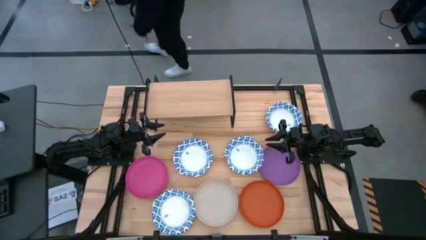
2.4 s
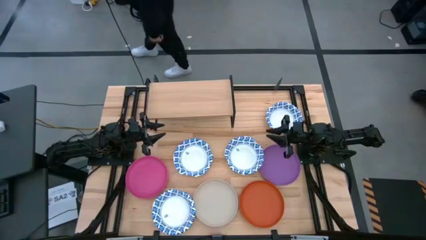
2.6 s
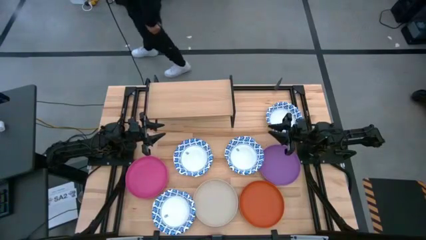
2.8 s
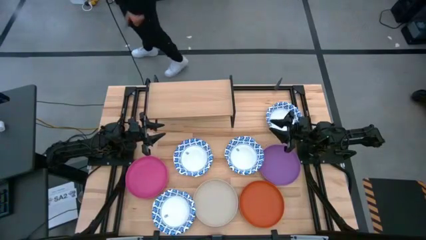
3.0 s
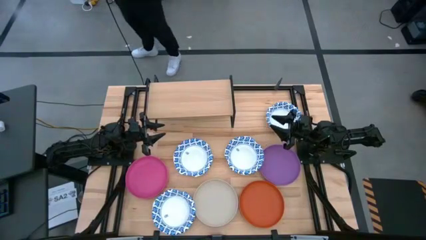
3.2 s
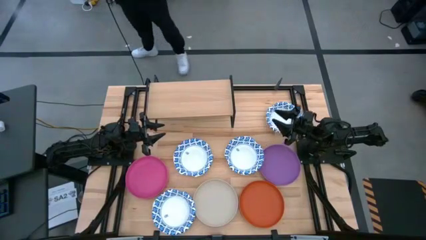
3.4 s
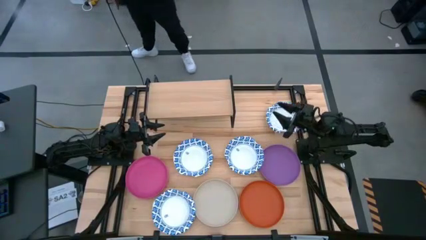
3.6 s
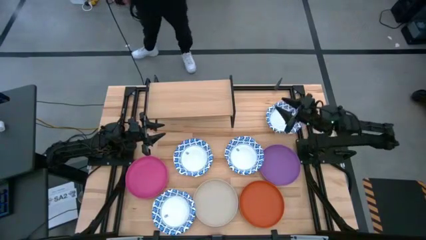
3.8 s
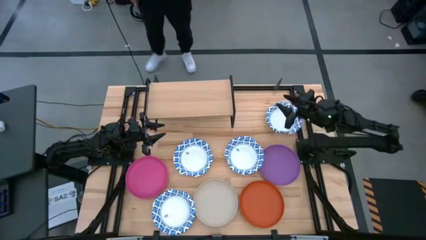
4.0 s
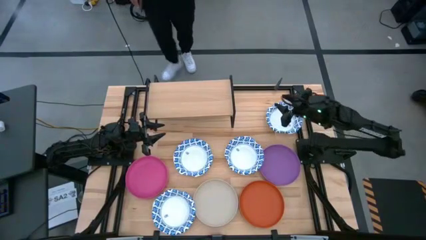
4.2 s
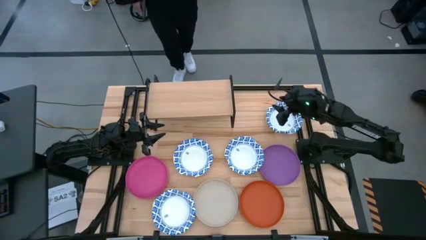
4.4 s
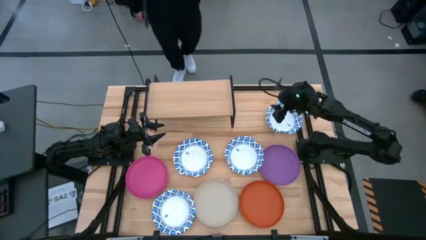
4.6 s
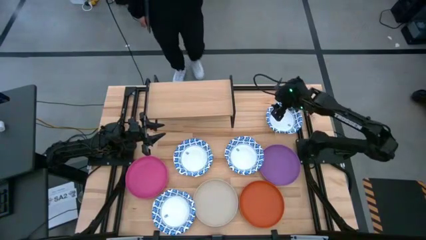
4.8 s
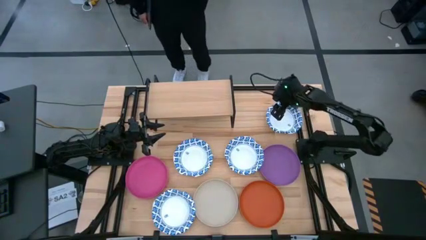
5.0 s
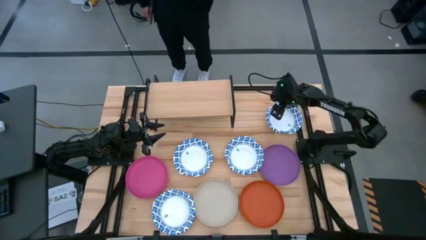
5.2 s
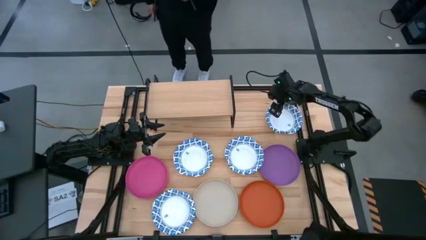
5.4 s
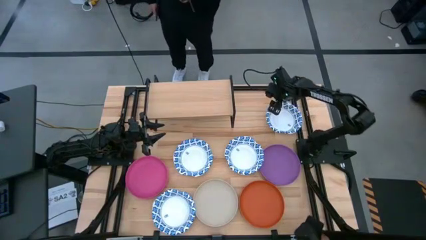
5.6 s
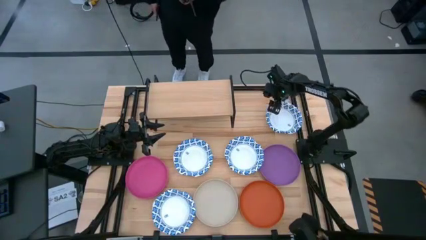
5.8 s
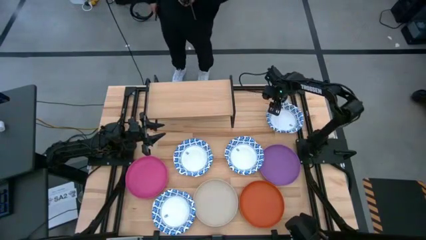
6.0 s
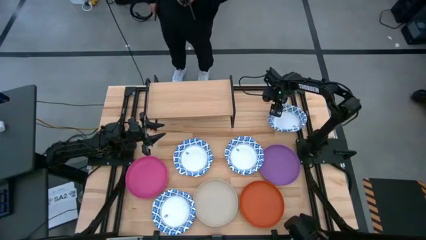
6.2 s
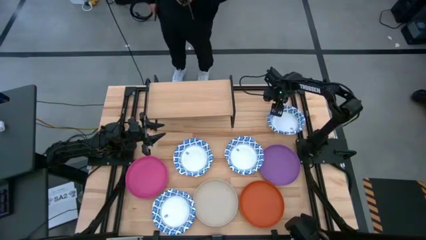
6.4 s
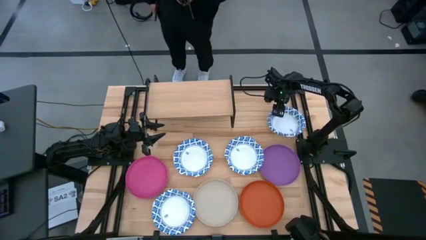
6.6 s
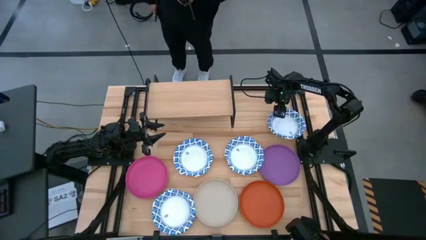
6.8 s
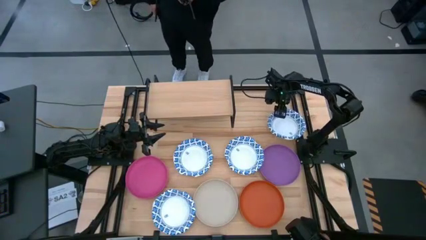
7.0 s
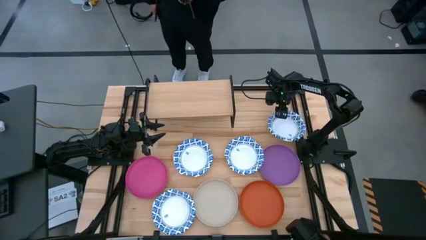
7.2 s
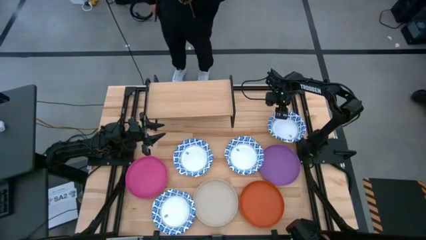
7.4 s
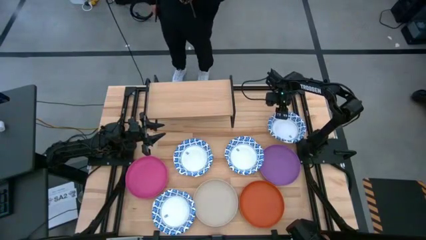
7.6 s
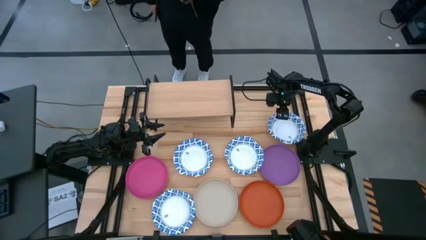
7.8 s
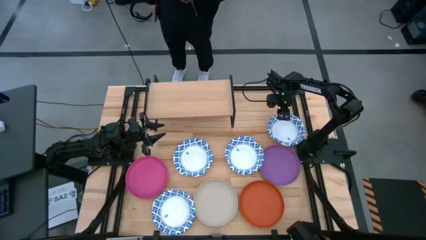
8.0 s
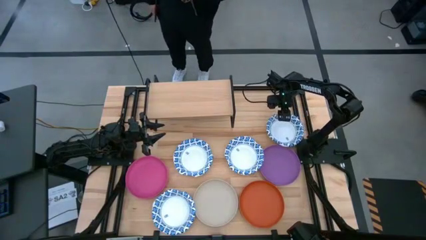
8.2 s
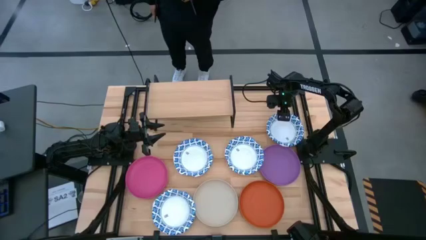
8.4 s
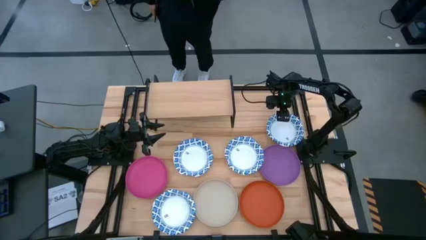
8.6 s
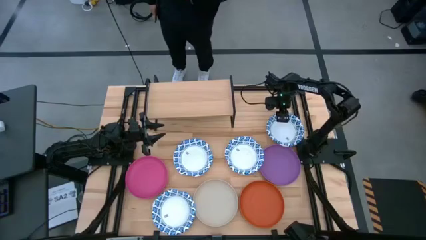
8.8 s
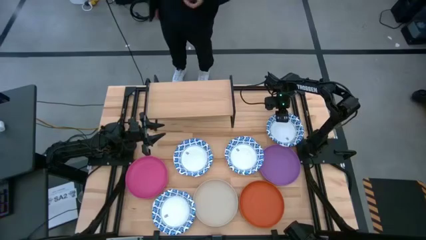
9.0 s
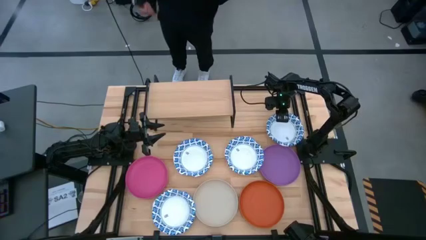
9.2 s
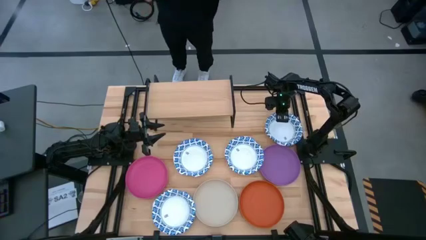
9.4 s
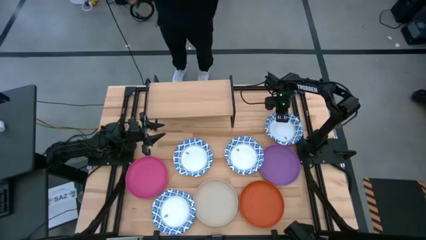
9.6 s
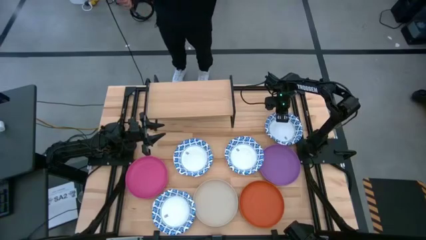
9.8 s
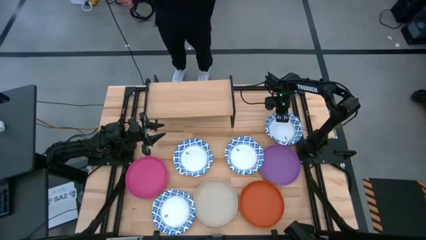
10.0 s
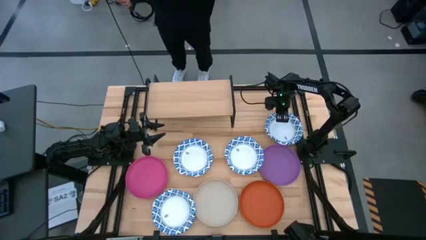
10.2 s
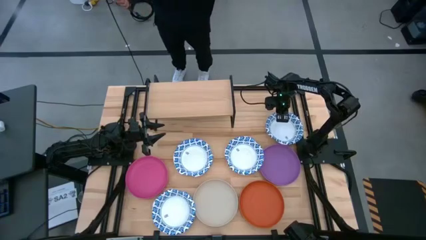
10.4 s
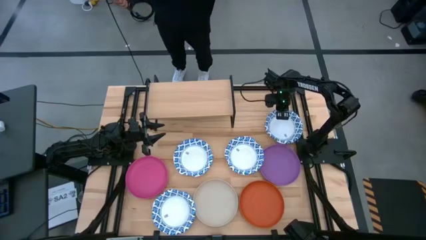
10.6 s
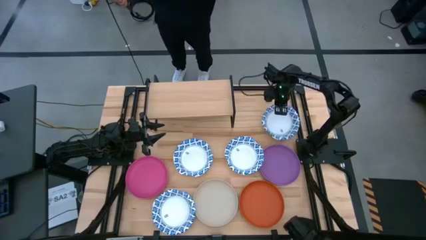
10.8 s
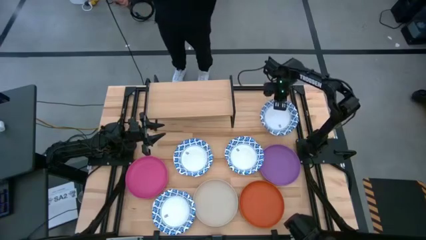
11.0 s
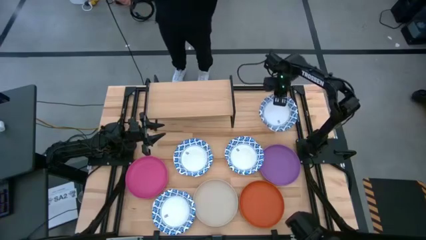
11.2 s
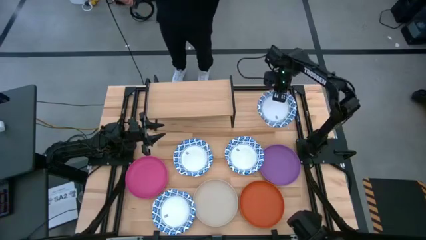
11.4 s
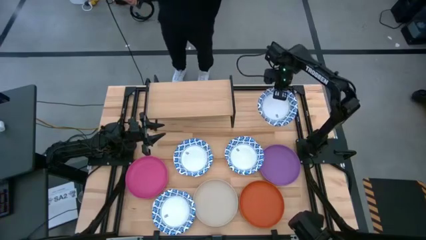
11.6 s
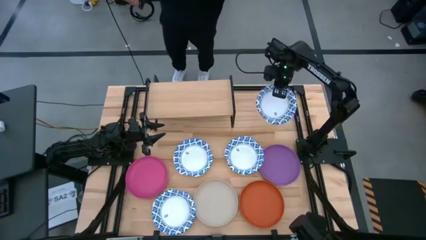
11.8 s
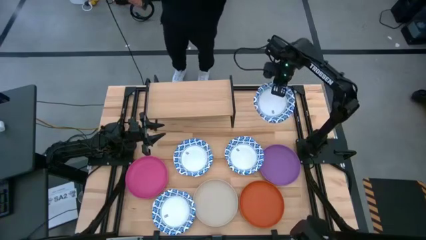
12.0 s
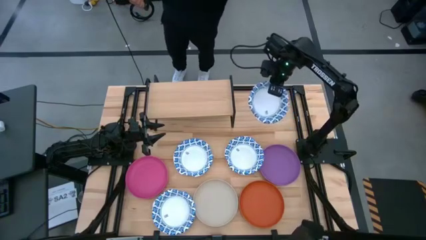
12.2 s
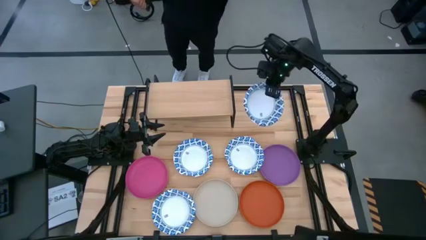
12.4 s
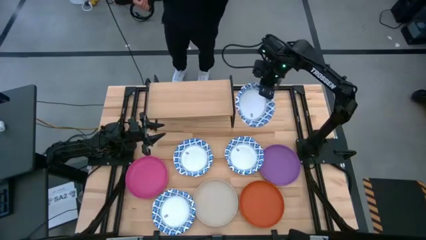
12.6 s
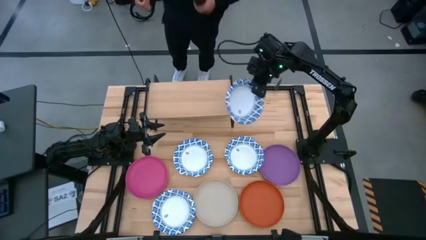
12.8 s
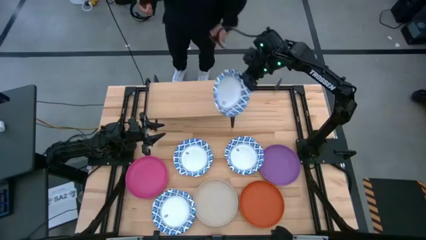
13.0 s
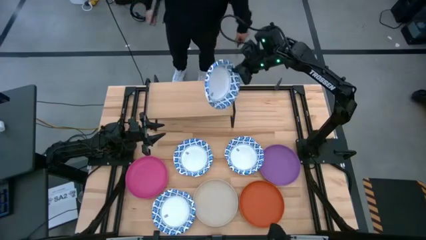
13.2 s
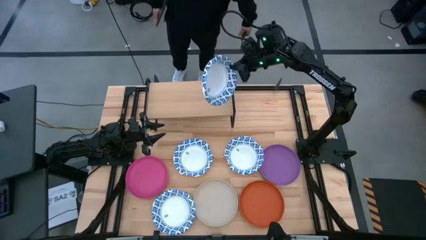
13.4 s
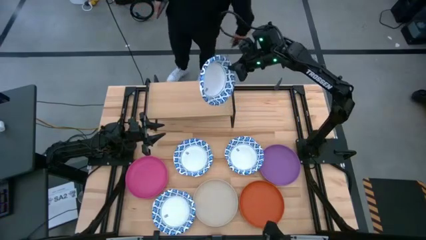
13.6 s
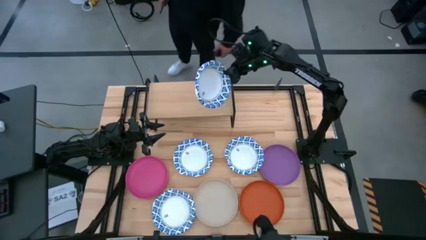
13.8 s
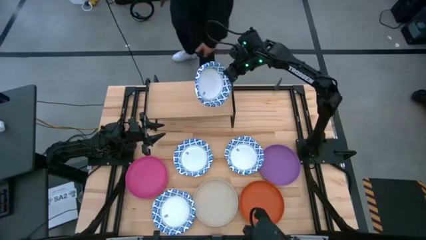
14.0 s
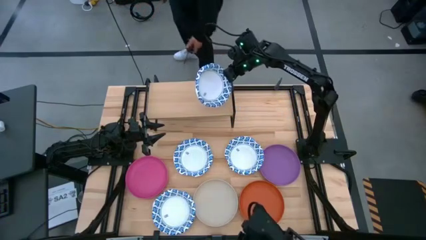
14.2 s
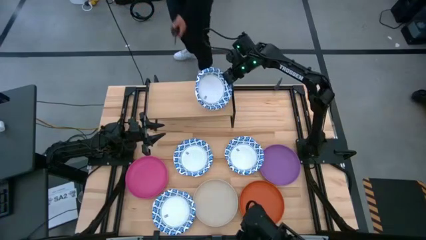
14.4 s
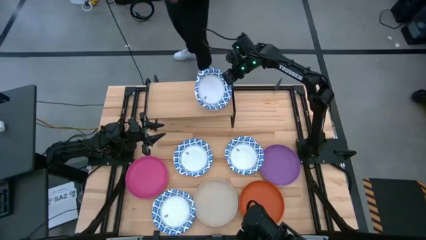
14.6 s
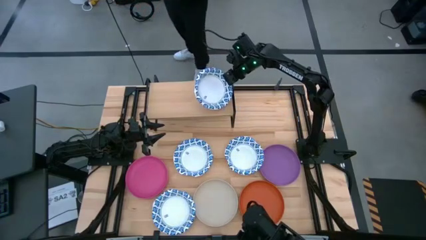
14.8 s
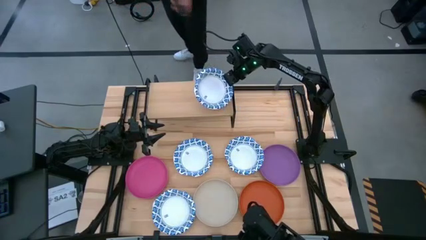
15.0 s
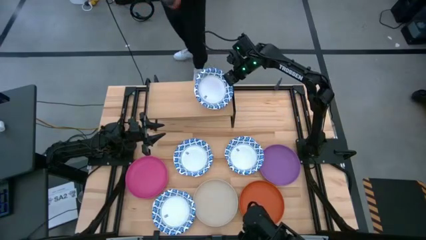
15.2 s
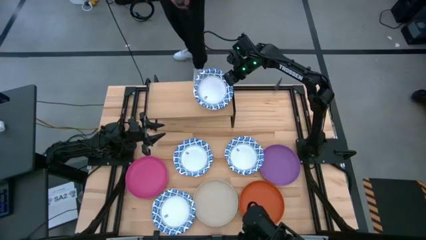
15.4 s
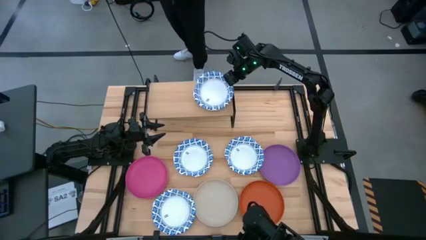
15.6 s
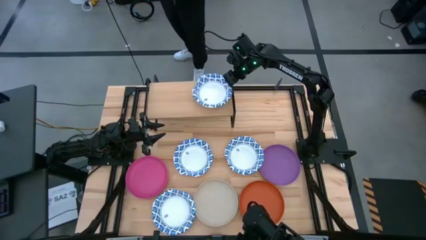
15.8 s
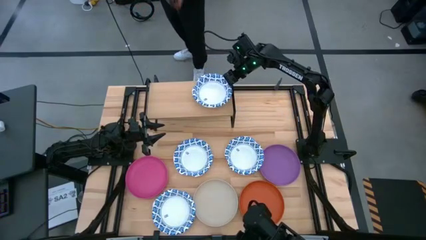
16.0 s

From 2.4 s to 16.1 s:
Task: Place and stack plates onto a shelf
Put the top right white patterned bowl on the shelf

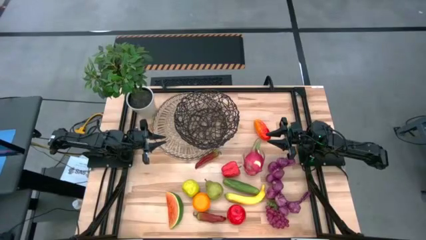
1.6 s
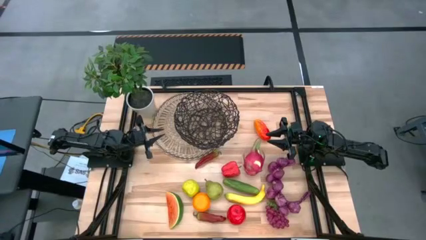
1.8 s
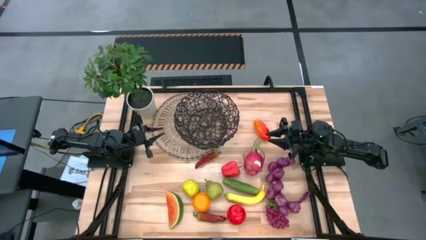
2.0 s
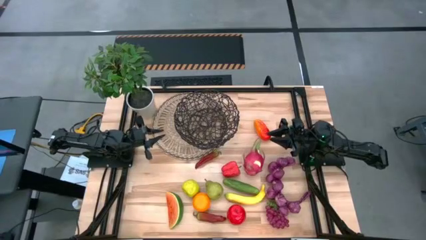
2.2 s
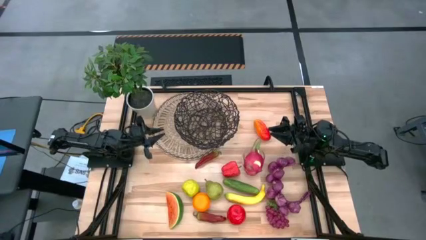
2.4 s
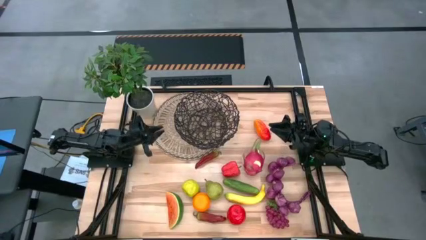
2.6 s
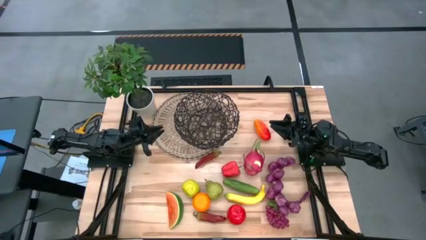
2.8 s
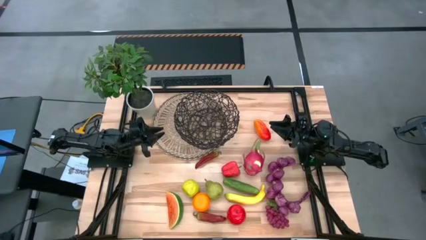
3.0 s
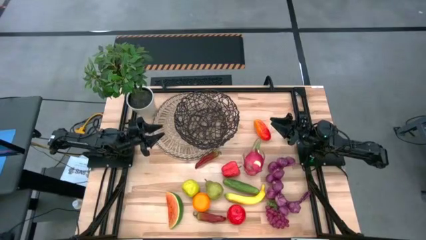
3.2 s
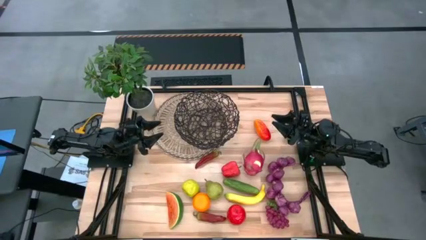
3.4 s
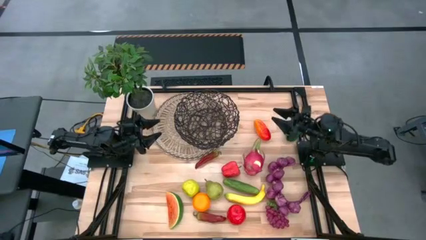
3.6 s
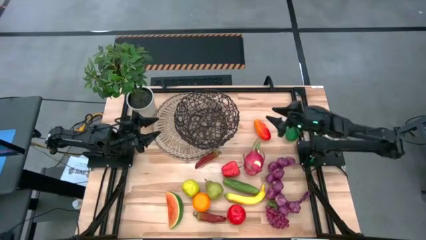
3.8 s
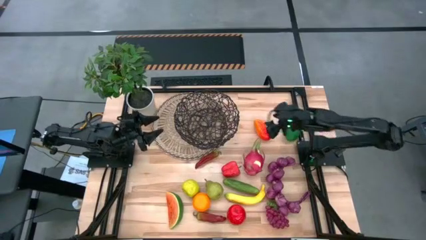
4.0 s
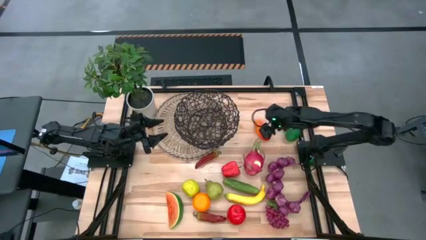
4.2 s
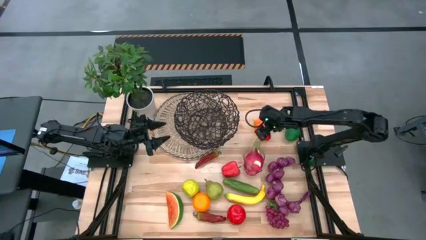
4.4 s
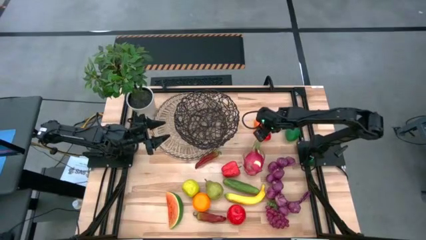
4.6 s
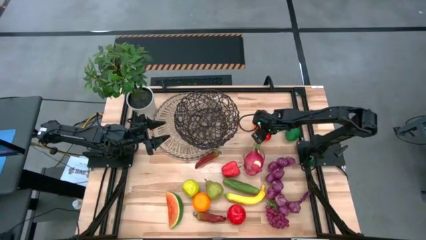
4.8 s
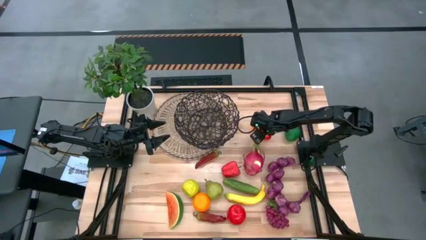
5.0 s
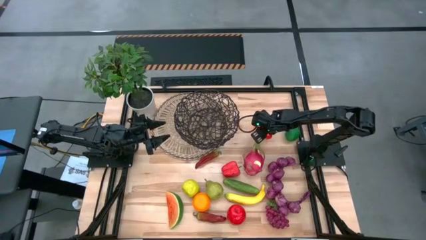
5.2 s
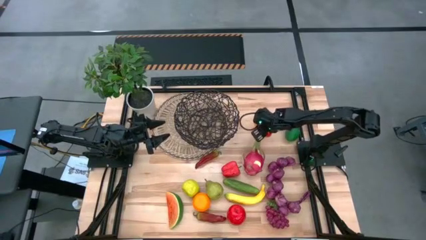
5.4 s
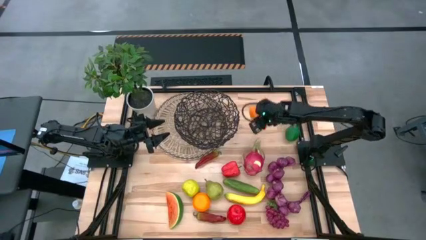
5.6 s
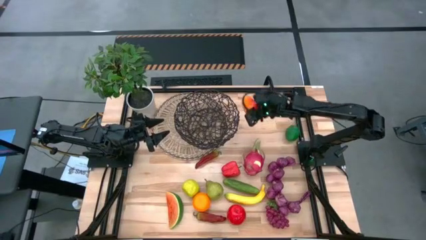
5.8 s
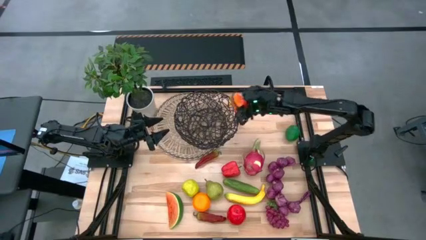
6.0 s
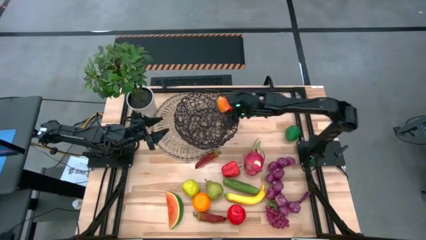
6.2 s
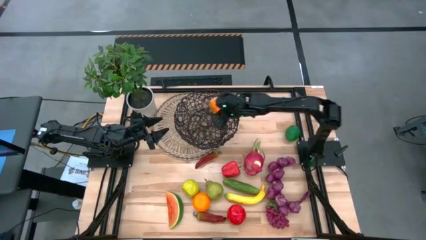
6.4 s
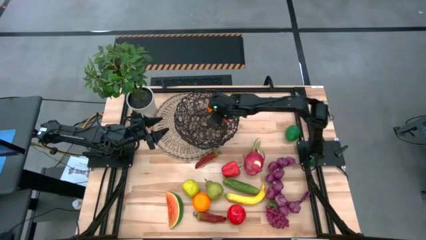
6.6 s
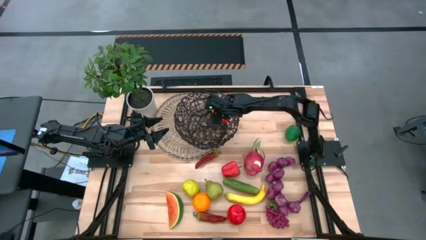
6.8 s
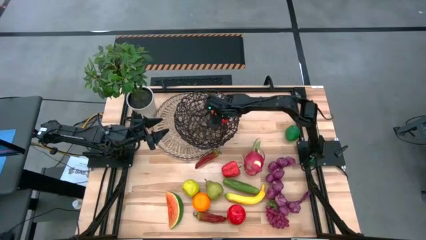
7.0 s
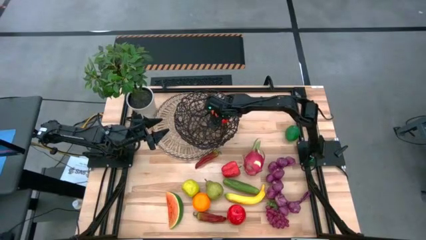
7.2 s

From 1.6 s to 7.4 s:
Task: Build produce basket
Put the mango into the wire basket
